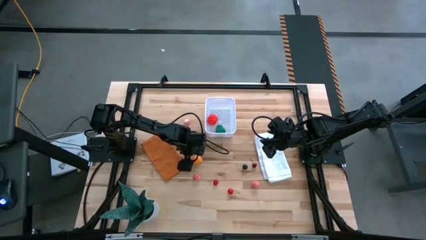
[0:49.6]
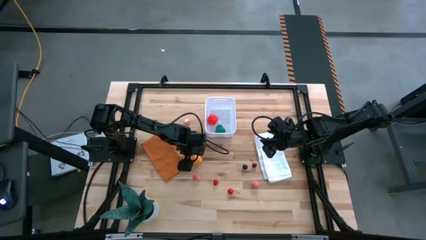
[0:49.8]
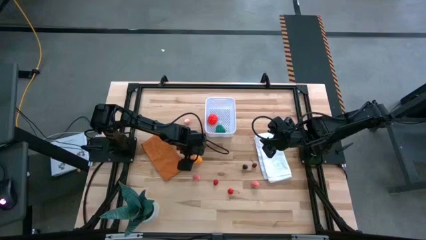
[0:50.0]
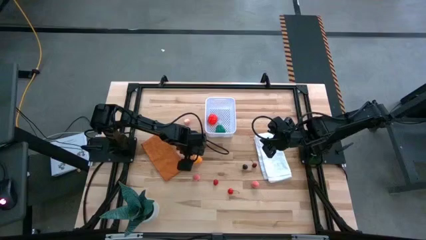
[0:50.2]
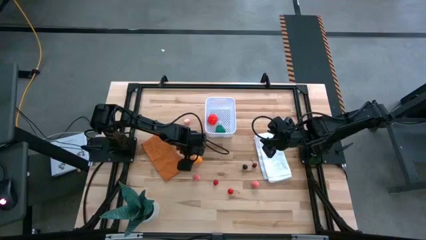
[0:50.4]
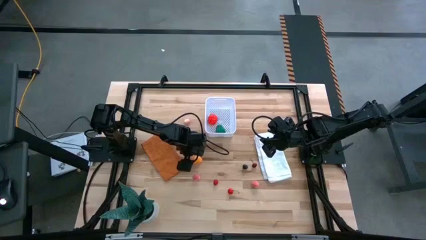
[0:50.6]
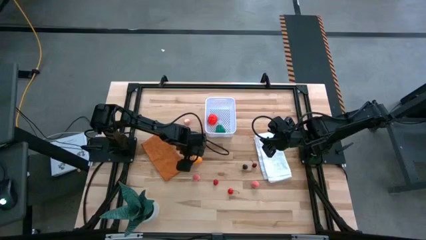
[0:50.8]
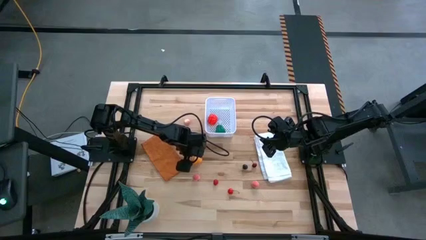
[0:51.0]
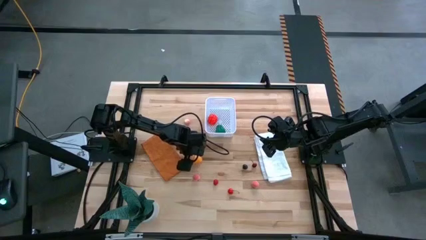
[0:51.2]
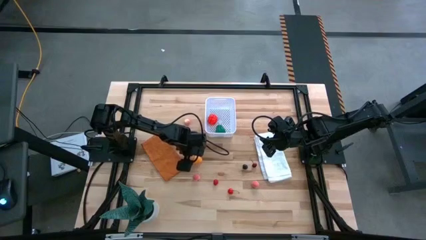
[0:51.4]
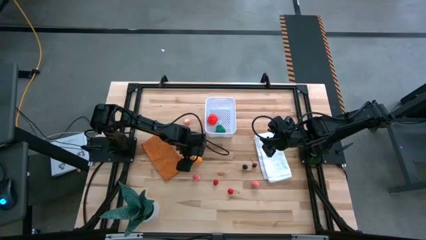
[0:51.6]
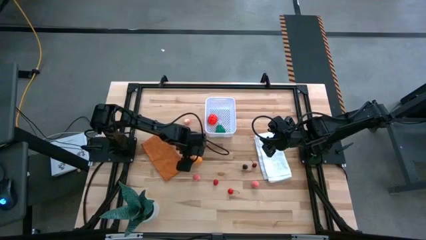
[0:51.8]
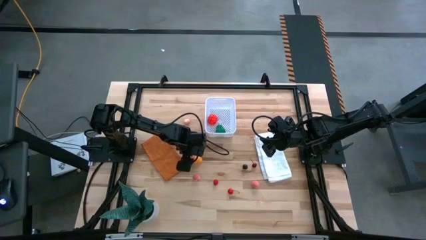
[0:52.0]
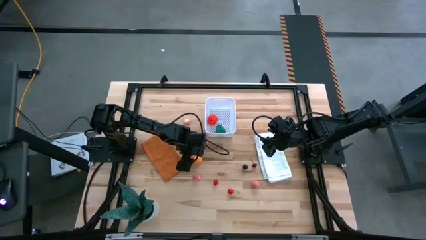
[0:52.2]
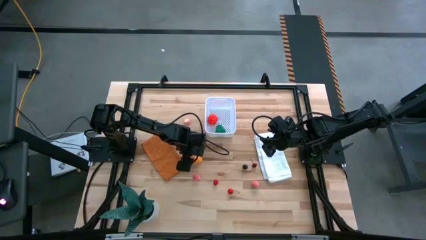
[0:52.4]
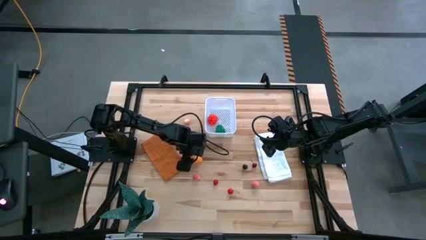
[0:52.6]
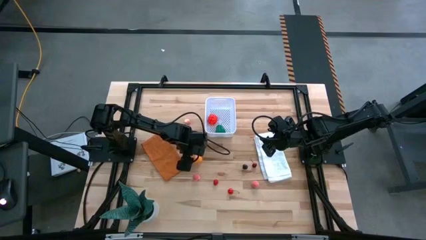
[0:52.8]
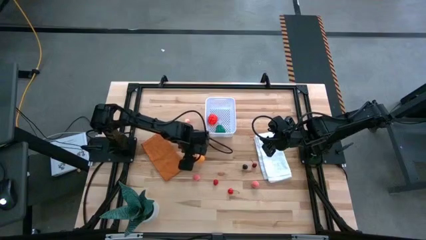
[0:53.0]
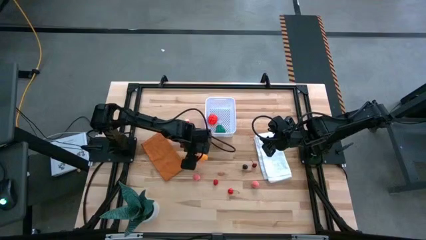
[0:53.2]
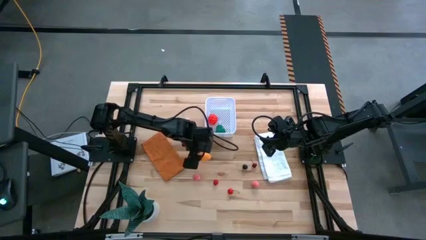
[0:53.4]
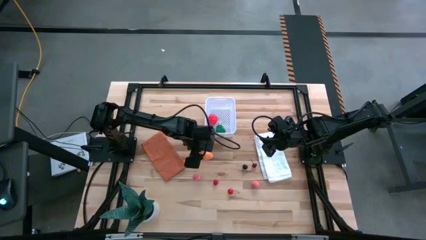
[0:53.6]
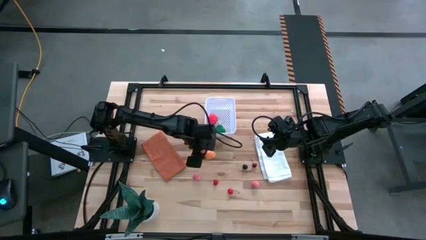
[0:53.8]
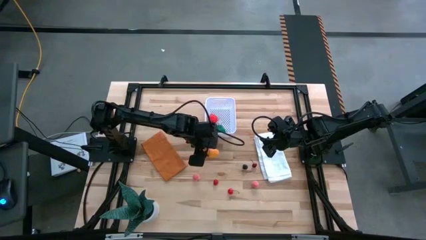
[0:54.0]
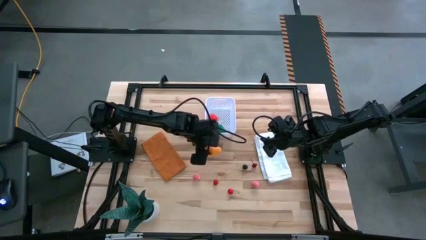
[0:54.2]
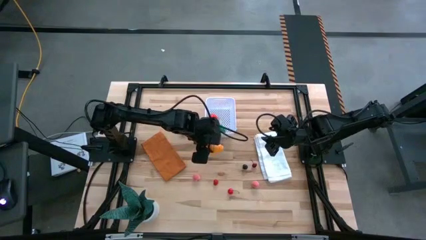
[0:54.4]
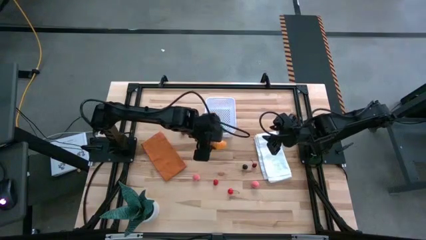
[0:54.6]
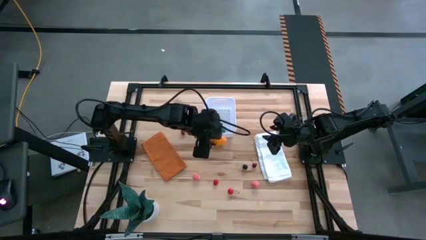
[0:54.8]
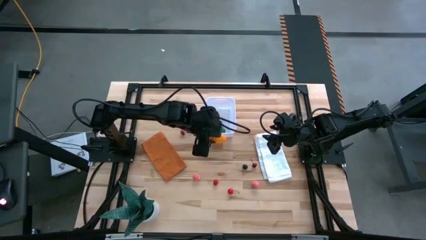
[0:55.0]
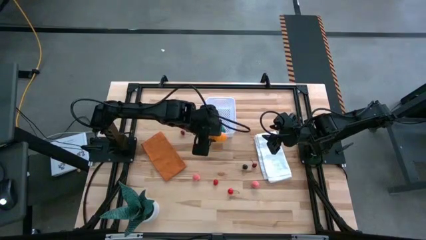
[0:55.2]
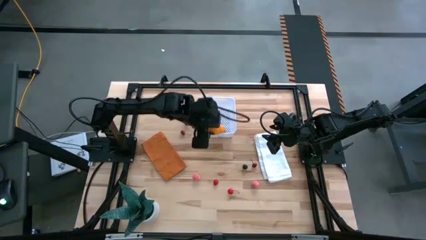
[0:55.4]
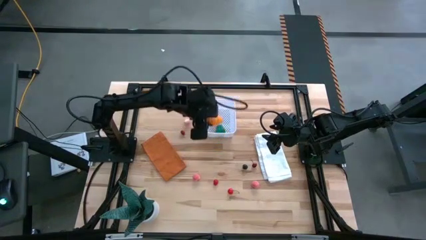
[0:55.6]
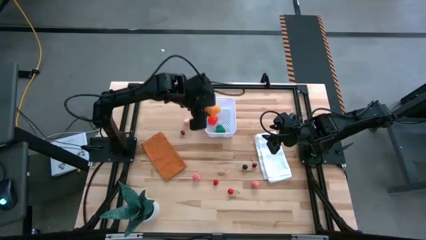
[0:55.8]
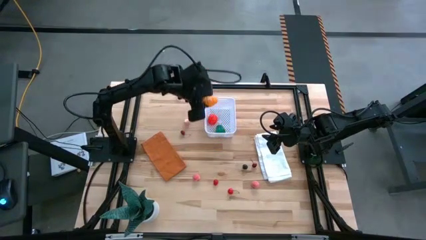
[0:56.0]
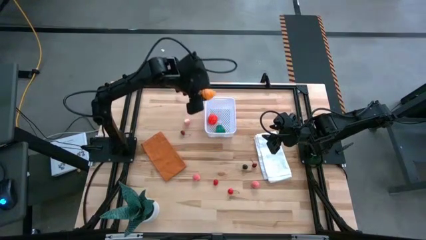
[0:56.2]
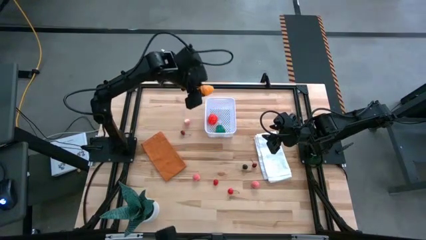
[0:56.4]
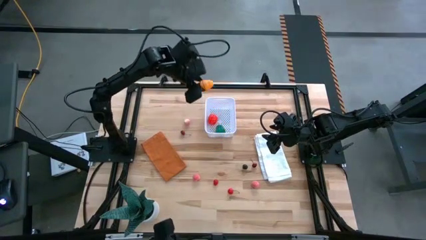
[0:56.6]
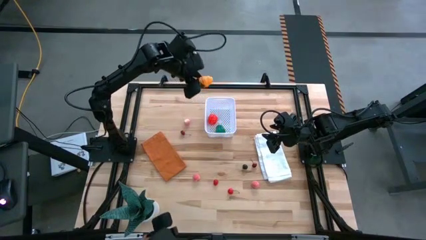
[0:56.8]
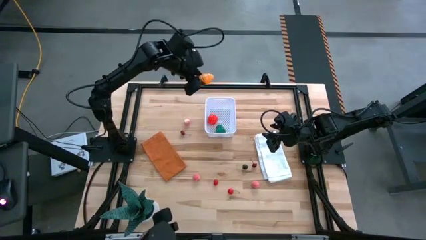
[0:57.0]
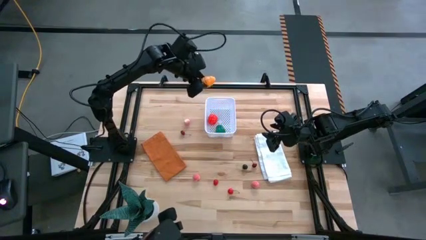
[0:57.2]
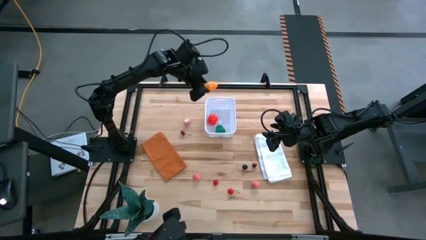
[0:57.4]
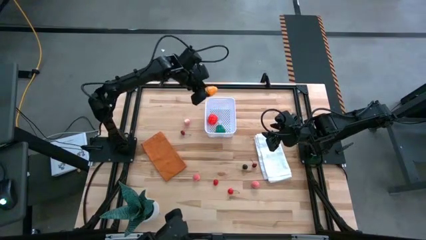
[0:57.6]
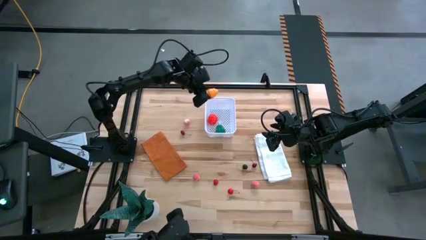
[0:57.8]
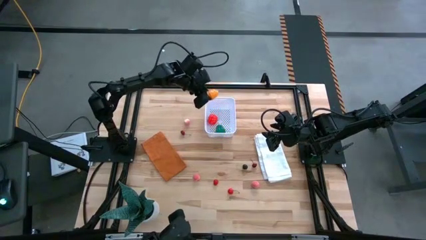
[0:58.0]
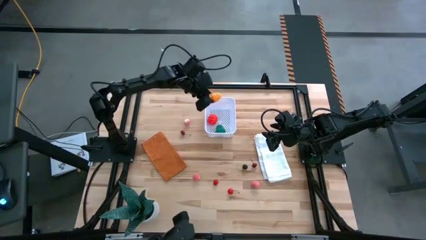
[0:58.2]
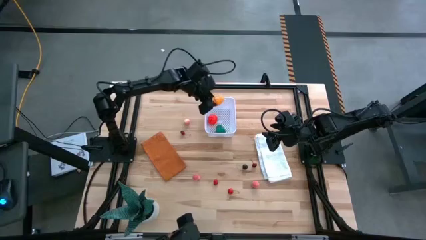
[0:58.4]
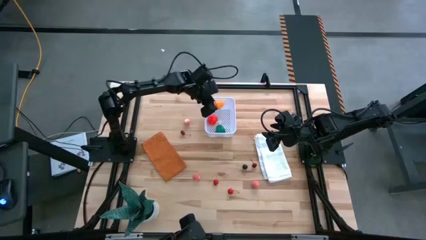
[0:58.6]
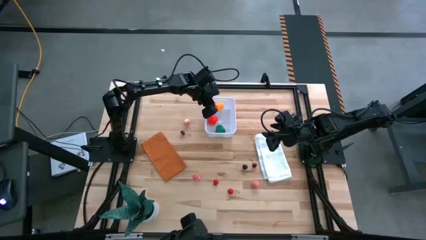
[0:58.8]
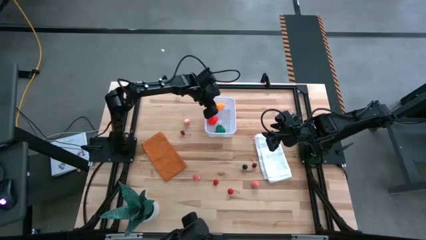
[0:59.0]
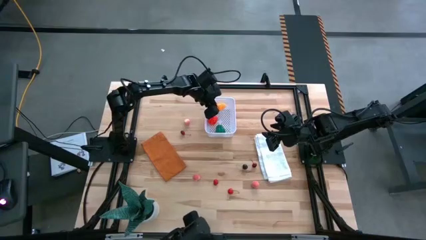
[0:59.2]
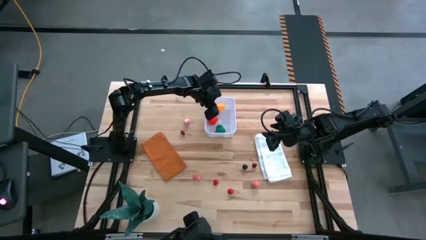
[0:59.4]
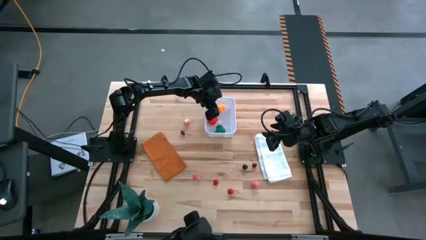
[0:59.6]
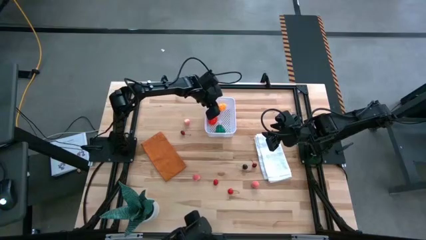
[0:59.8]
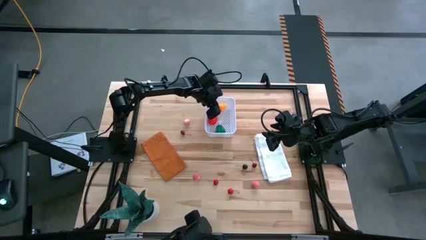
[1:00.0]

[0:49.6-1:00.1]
Task: Pick and placing Produce into tupperware
Put the croissant into the white bin

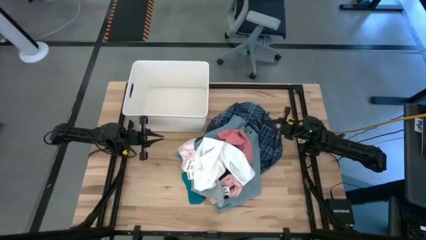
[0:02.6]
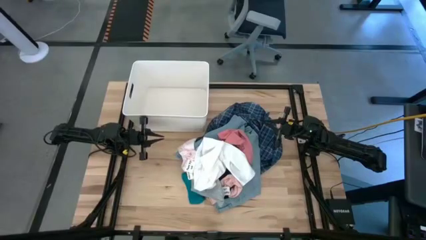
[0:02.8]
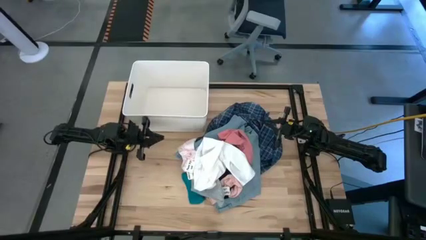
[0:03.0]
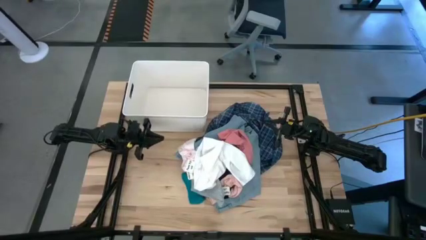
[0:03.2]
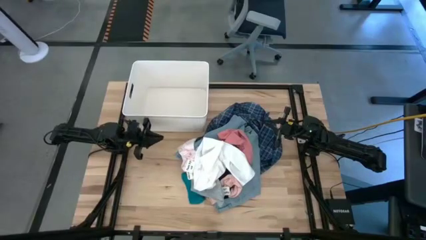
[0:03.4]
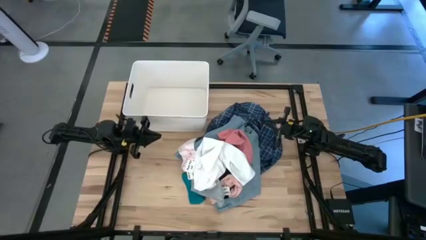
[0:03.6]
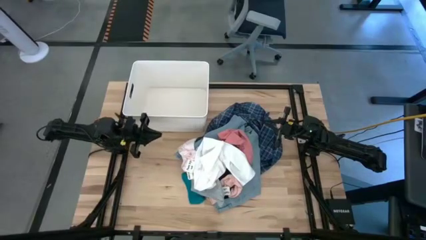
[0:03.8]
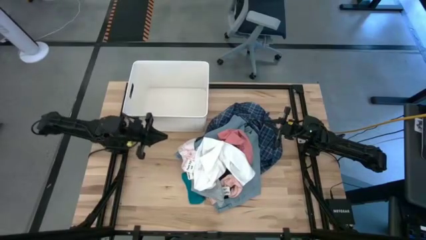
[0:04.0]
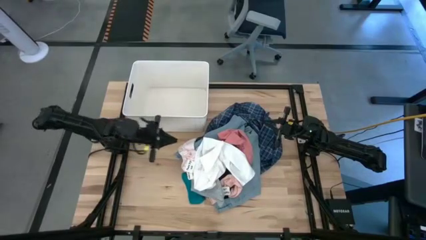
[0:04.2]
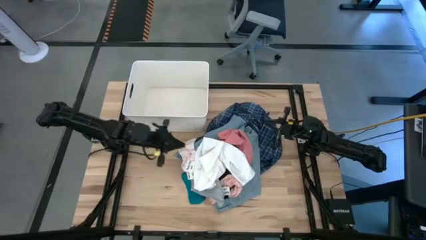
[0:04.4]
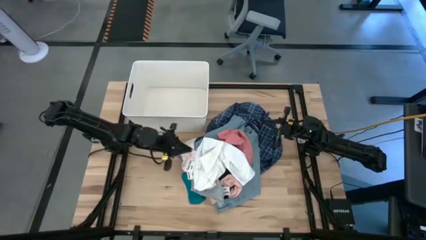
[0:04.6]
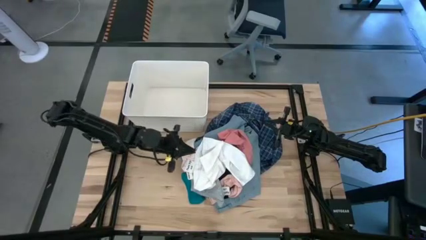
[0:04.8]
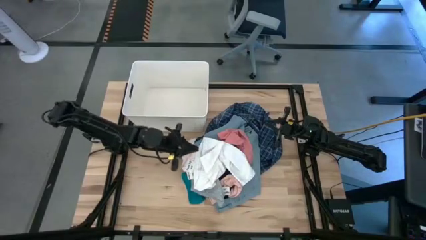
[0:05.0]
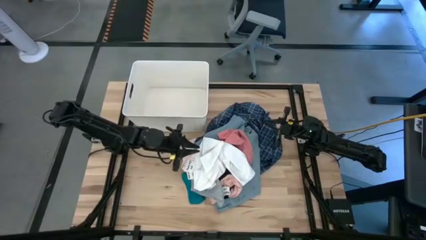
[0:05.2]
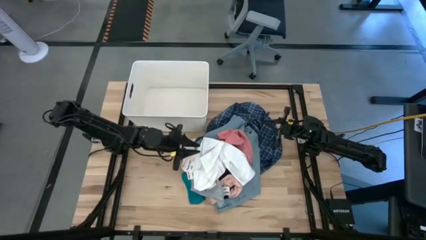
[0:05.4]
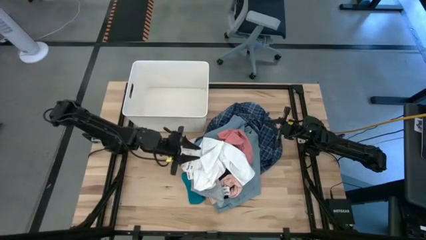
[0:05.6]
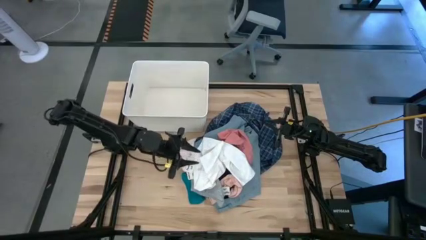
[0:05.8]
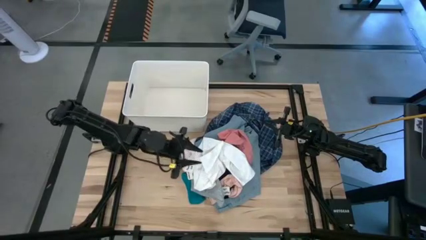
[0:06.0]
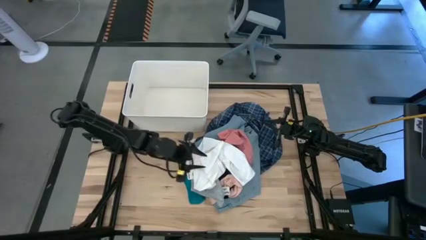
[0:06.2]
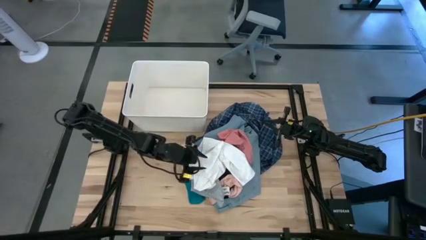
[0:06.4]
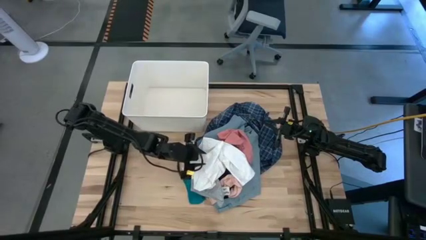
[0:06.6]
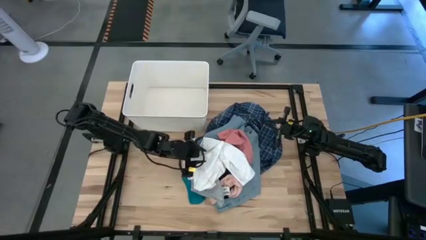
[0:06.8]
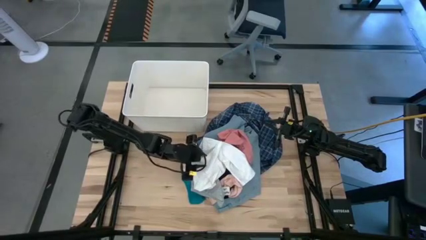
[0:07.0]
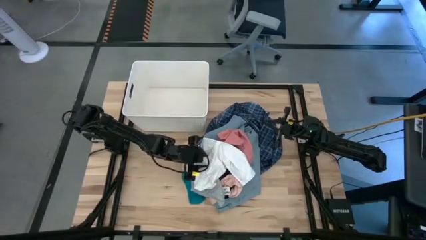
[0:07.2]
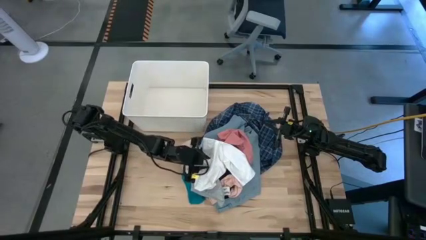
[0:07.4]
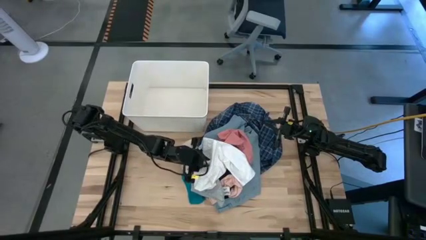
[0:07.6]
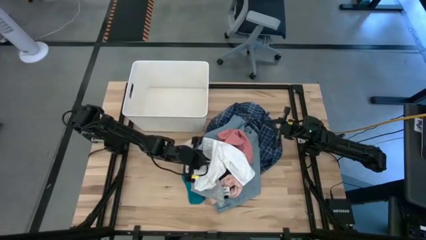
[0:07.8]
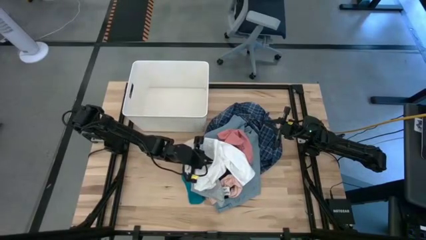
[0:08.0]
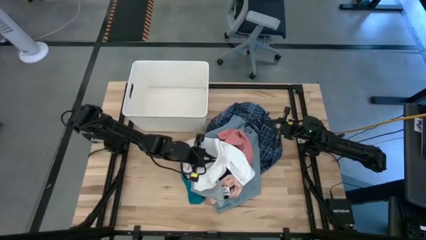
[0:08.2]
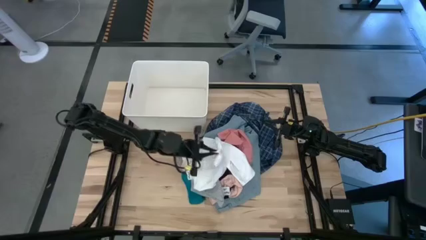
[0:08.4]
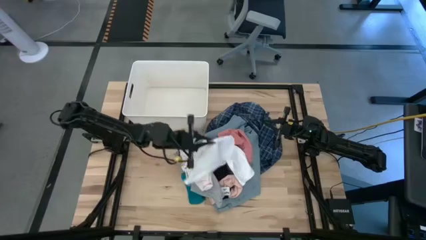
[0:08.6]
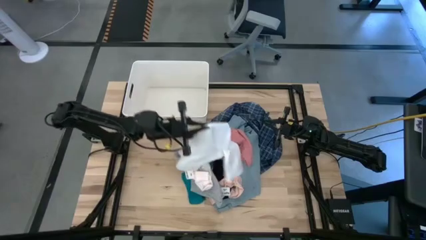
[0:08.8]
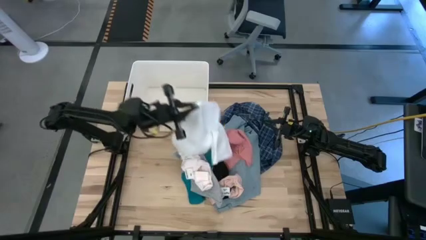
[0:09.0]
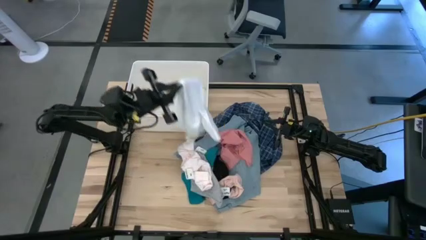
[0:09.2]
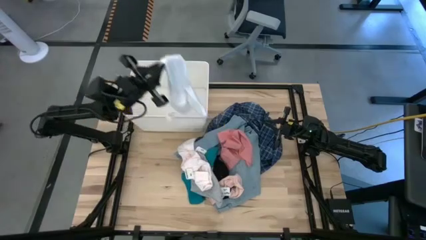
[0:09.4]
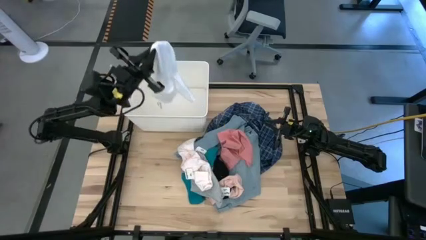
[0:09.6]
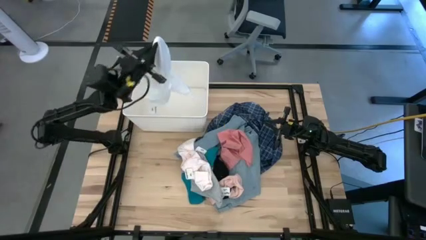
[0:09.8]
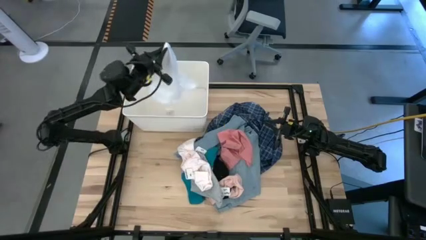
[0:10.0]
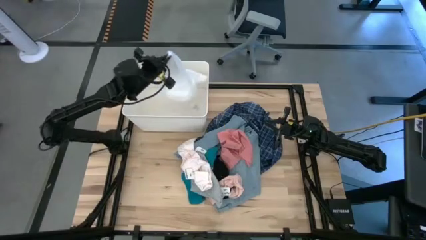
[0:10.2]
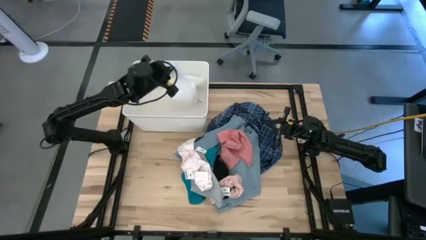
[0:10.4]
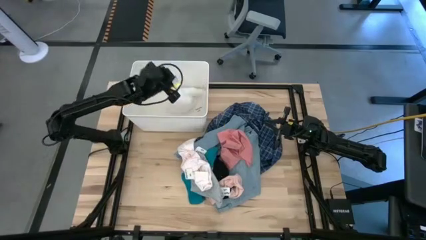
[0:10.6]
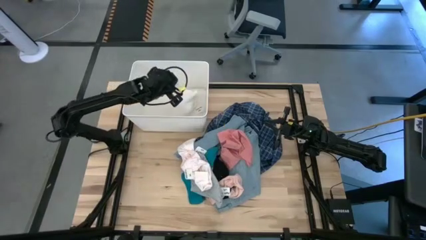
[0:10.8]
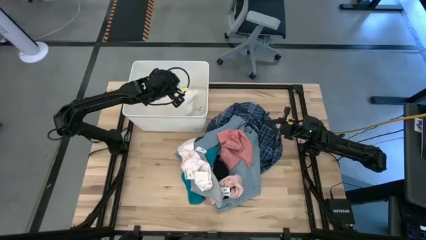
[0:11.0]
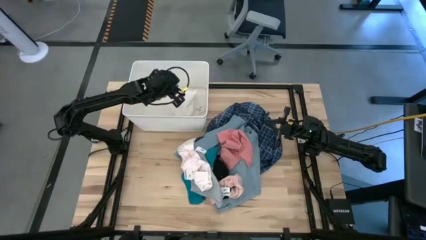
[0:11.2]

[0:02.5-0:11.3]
Task: Sort clothes
Put the white underwear into the white laundry bin
